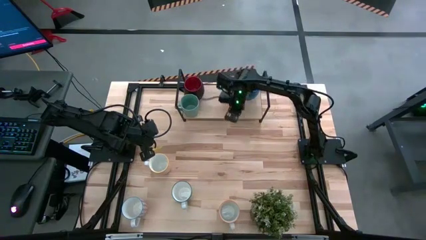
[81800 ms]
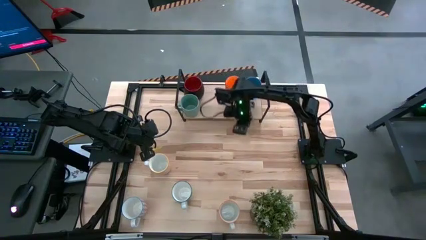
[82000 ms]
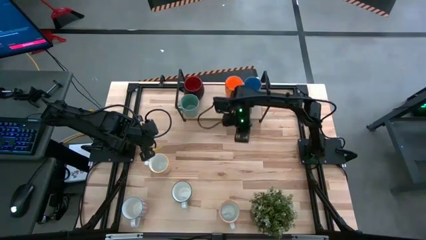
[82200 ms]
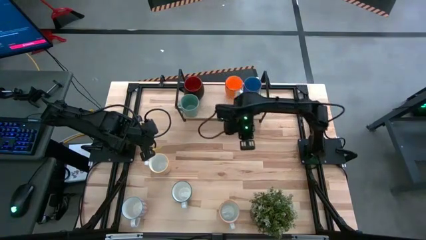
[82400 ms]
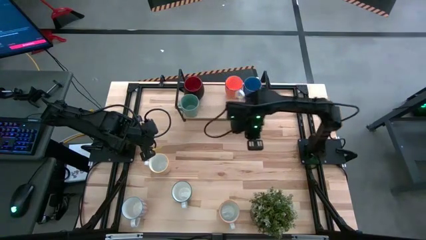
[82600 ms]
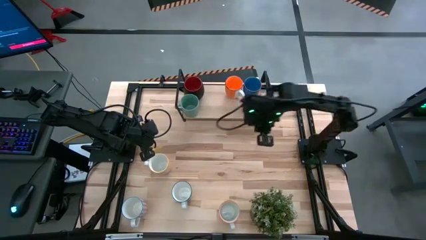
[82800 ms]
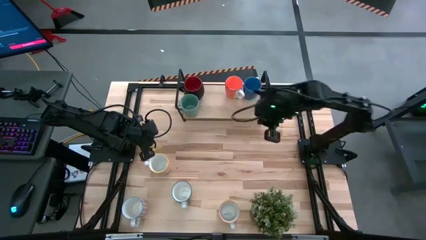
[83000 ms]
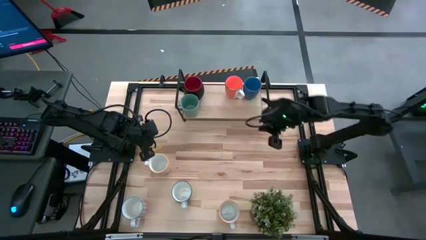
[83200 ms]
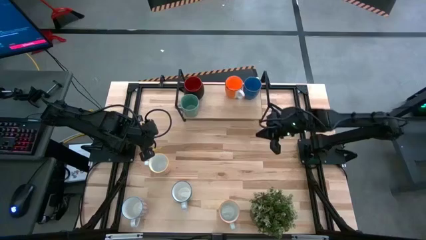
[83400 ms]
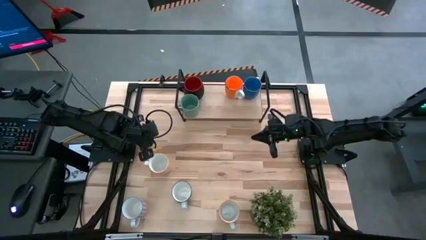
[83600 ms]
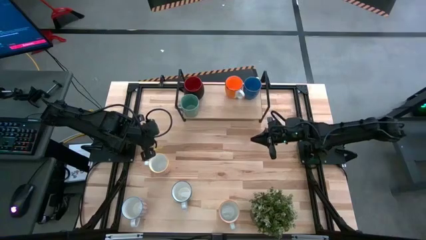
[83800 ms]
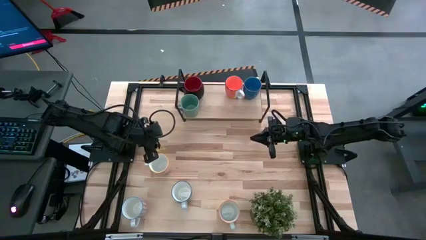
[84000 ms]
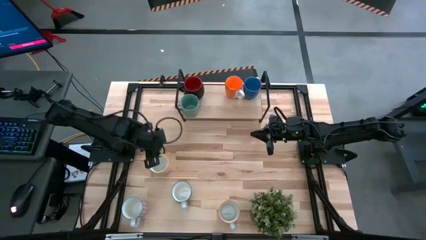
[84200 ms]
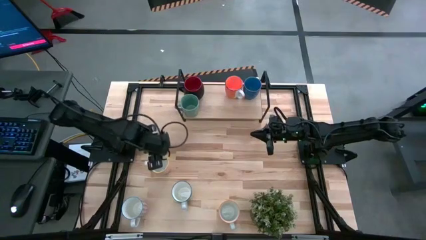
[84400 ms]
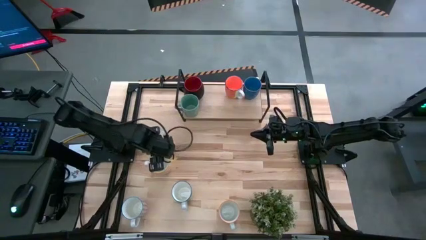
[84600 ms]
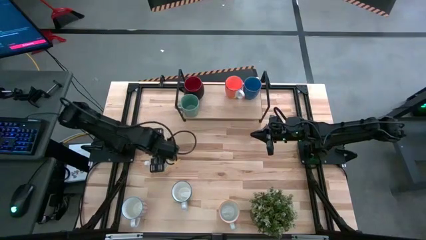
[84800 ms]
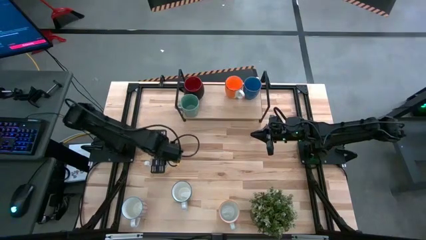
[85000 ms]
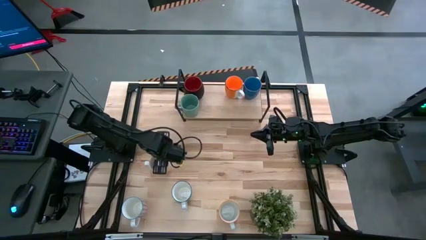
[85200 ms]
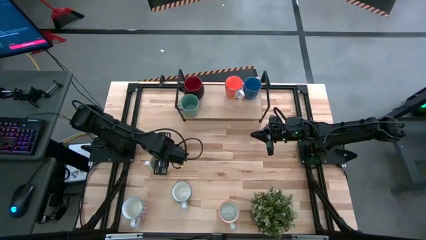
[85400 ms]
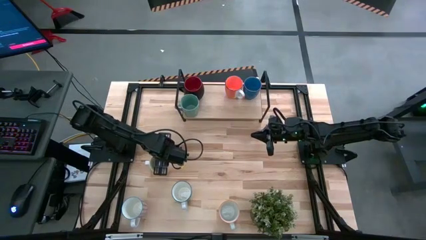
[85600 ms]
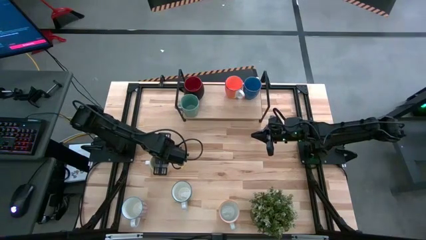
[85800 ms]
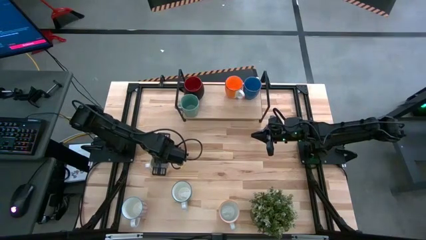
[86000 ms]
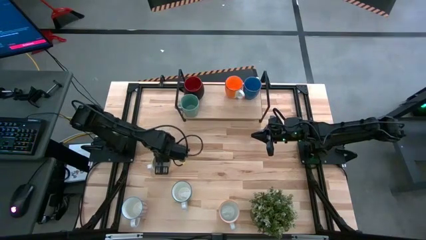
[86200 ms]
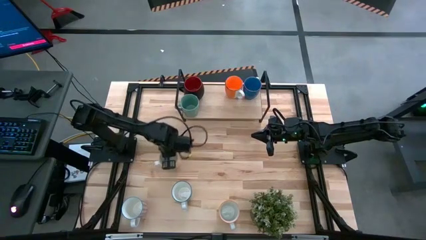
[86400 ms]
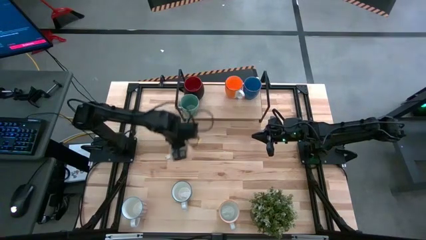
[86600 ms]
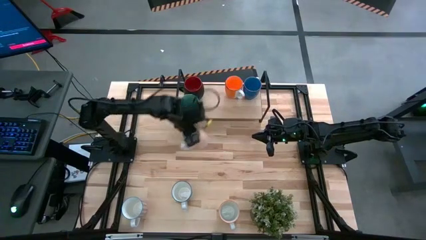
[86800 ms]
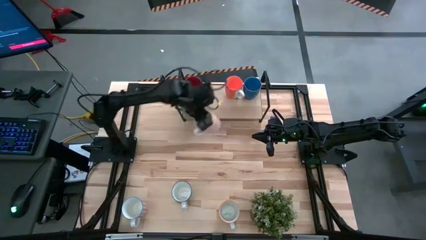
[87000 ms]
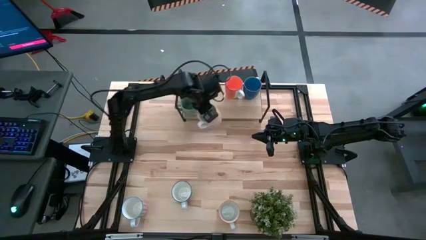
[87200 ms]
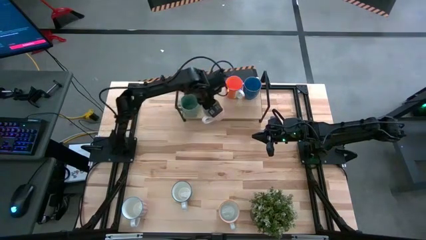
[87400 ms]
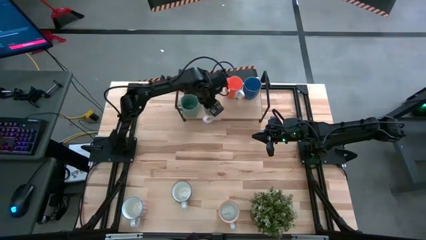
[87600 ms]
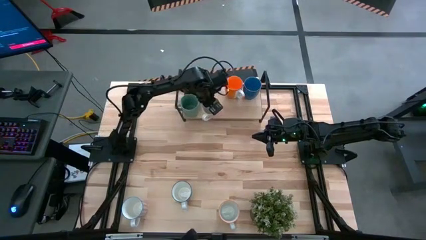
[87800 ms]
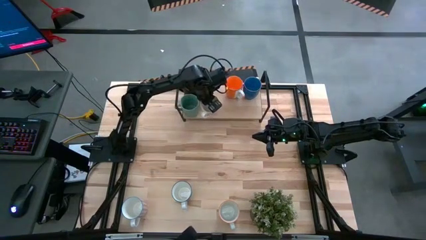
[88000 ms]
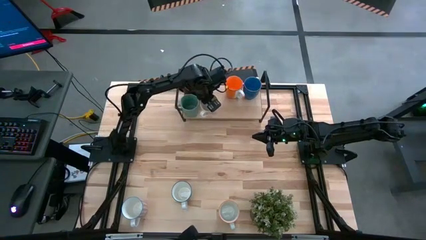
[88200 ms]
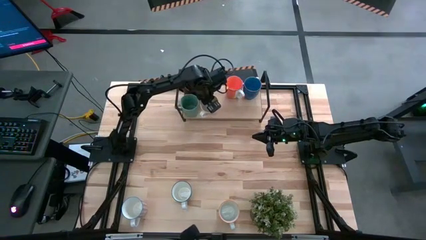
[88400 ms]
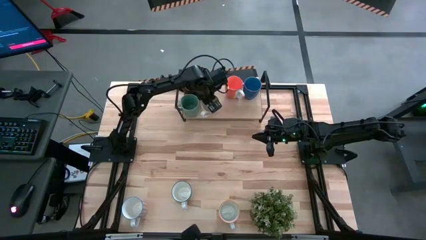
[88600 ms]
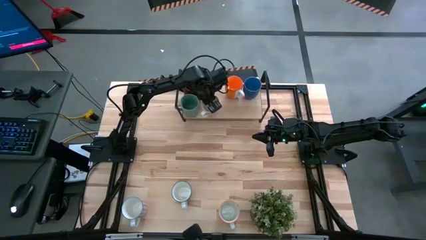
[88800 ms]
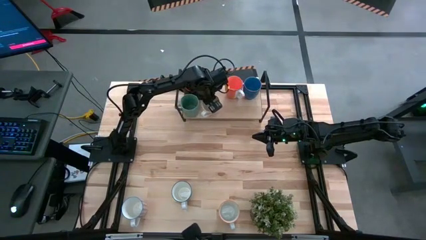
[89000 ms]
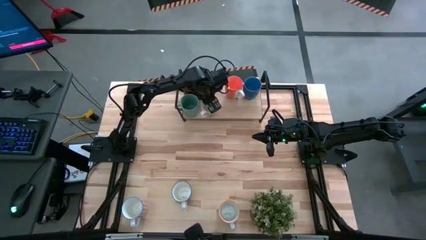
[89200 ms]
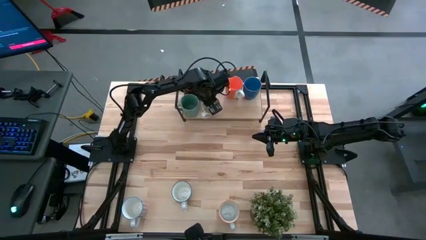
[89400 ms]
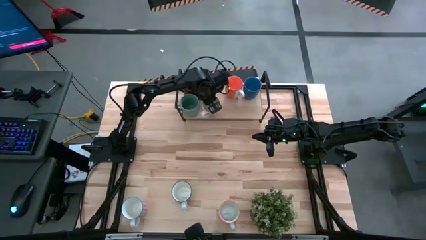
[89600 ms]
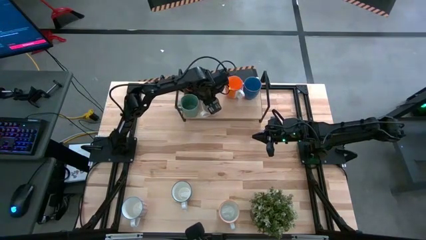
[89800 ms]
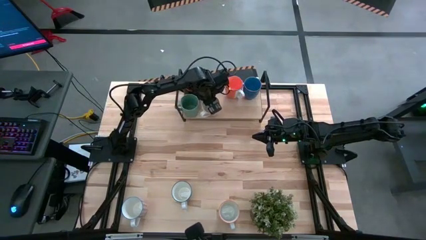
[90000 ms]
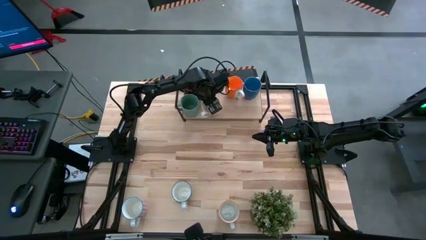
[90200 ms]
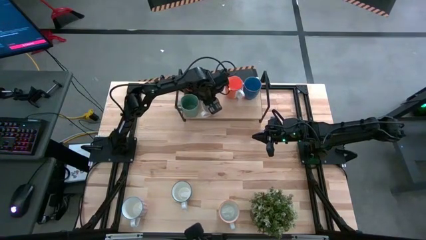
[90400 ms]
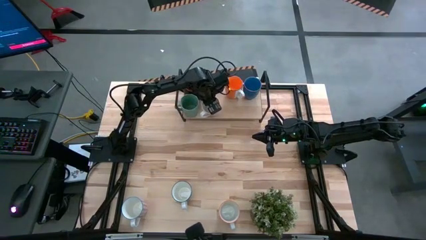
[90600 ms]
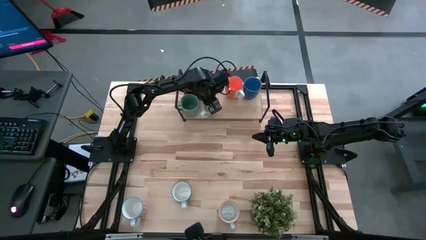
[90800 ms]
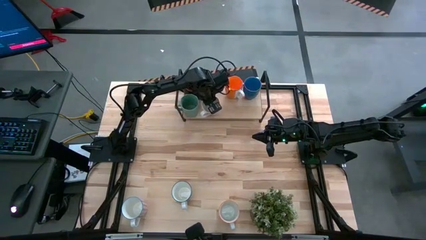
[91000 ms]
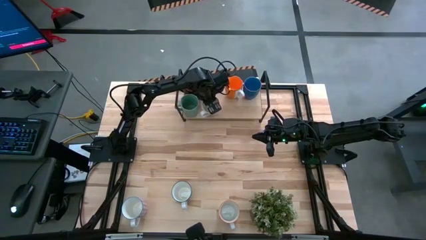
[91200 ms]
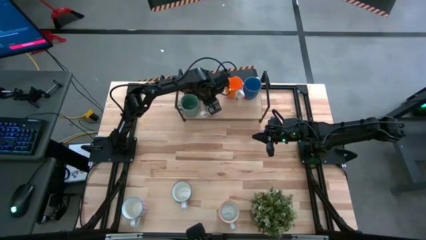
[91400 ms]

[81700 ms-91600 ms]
Task: Place coffee mugs
Put the orange pattern mug on the shelf

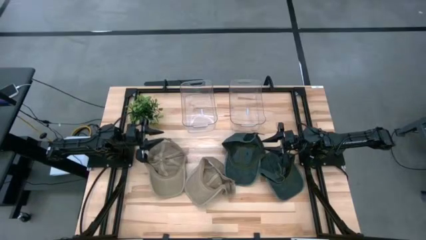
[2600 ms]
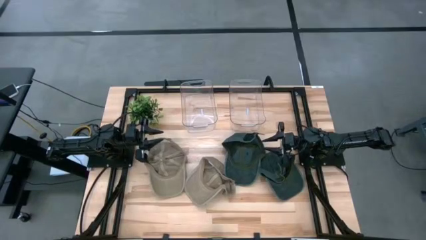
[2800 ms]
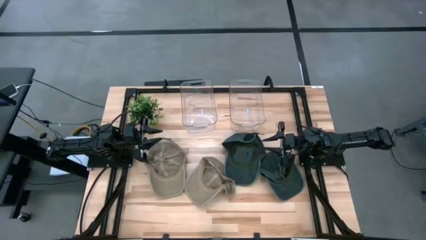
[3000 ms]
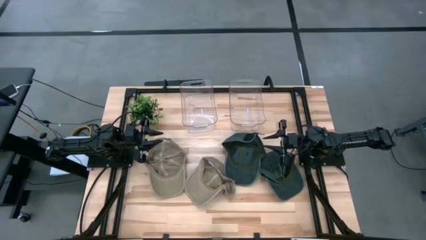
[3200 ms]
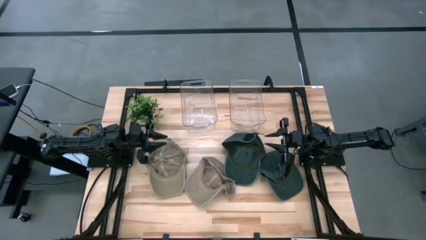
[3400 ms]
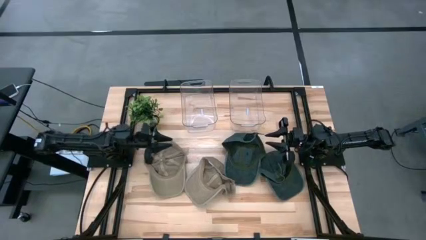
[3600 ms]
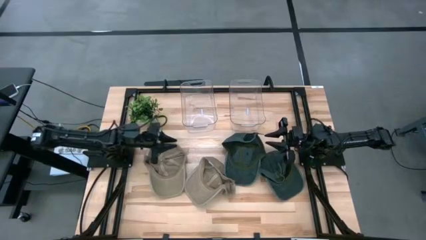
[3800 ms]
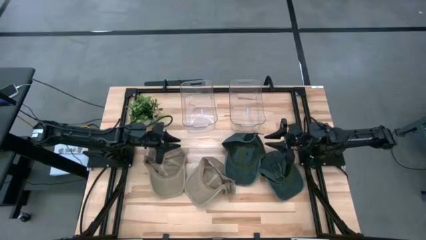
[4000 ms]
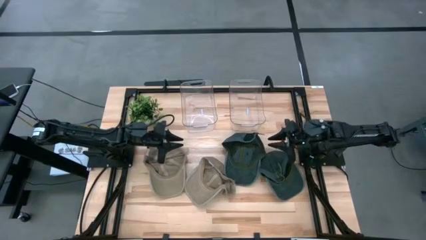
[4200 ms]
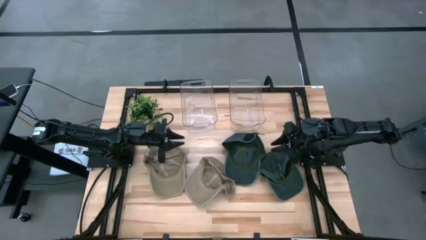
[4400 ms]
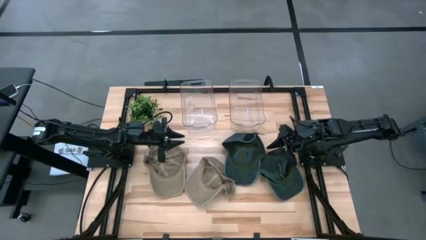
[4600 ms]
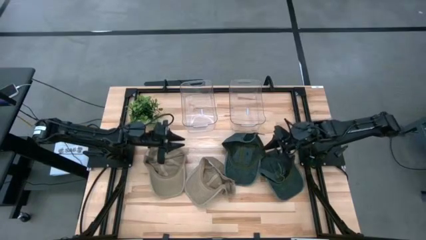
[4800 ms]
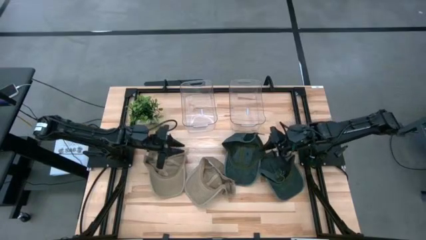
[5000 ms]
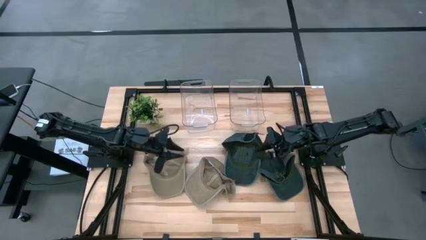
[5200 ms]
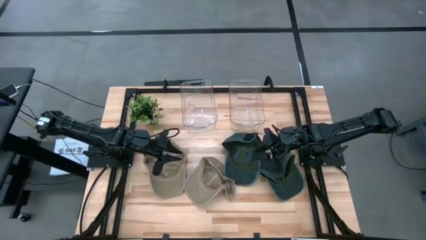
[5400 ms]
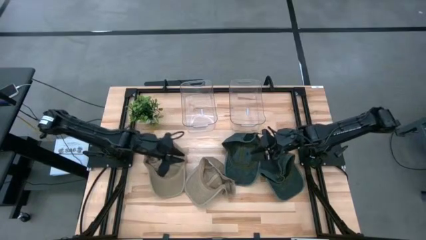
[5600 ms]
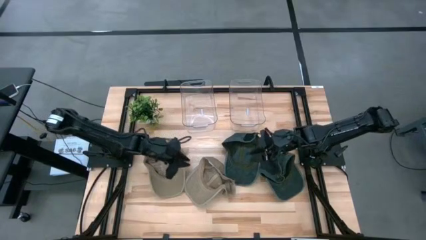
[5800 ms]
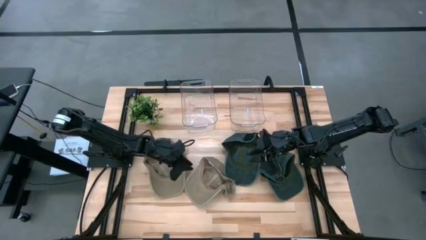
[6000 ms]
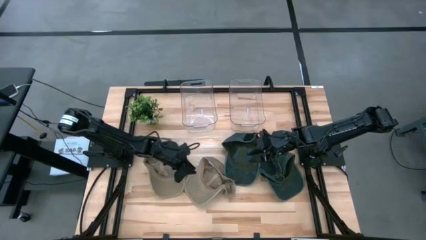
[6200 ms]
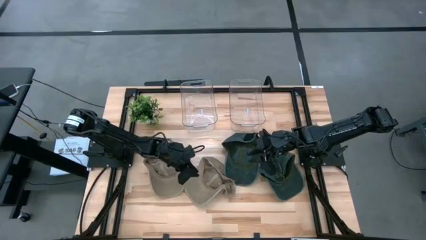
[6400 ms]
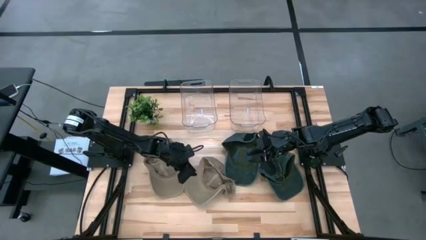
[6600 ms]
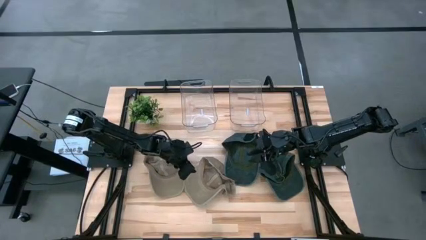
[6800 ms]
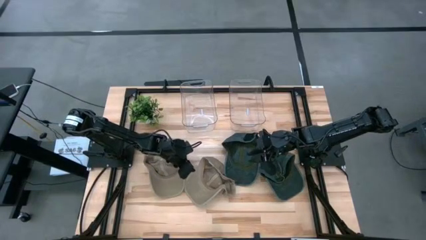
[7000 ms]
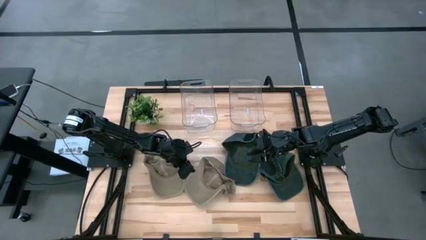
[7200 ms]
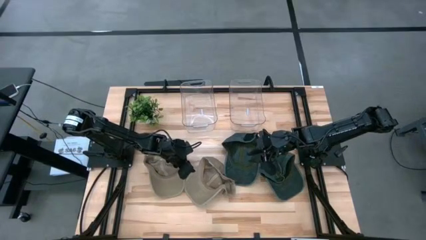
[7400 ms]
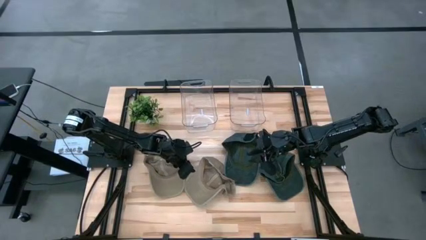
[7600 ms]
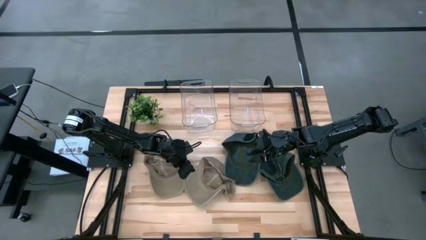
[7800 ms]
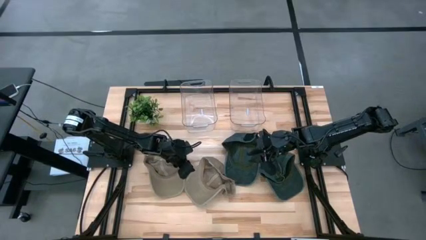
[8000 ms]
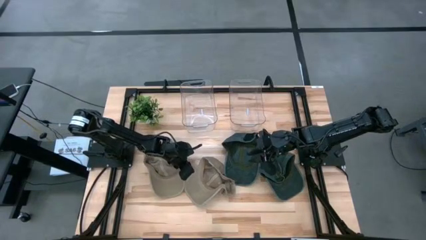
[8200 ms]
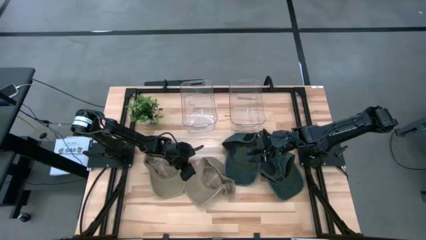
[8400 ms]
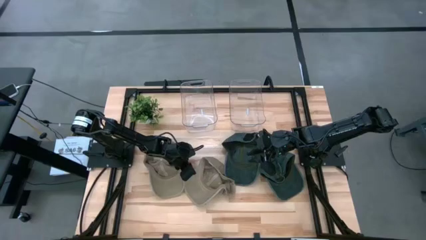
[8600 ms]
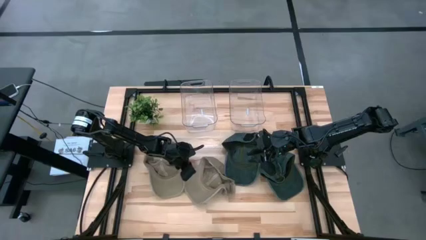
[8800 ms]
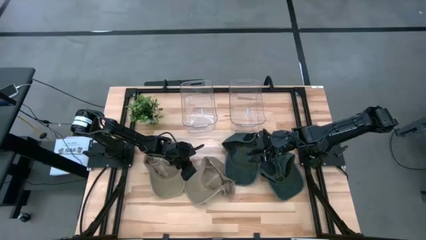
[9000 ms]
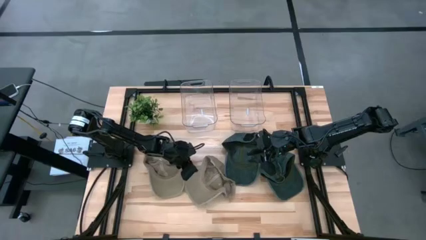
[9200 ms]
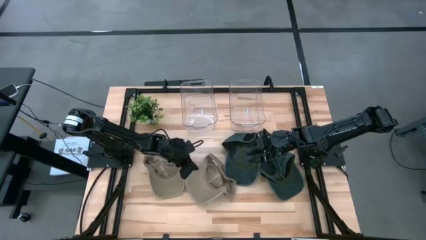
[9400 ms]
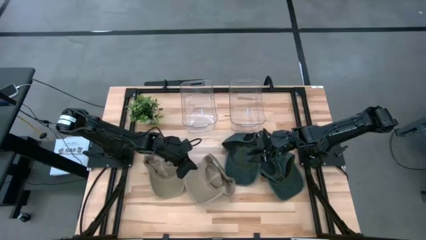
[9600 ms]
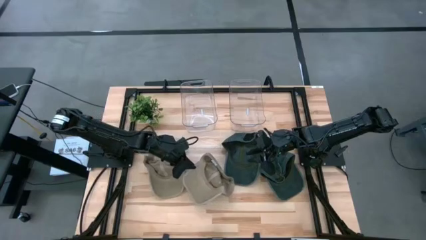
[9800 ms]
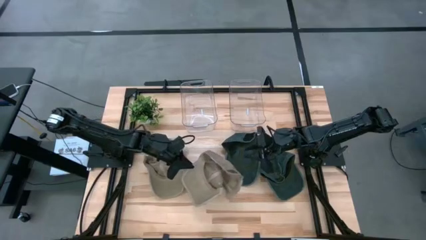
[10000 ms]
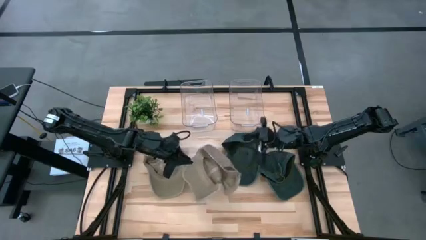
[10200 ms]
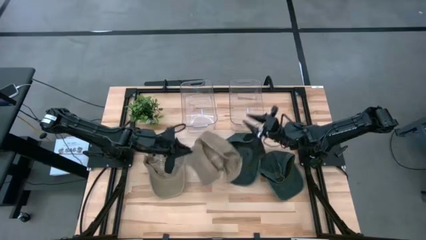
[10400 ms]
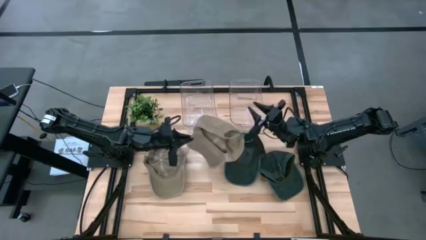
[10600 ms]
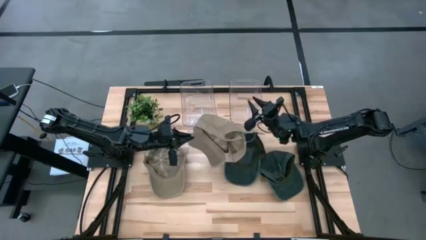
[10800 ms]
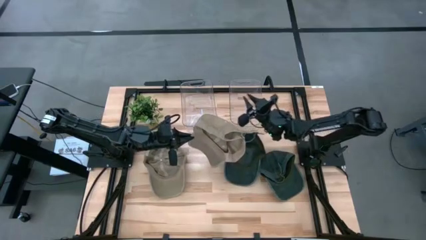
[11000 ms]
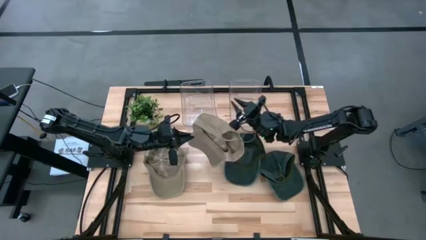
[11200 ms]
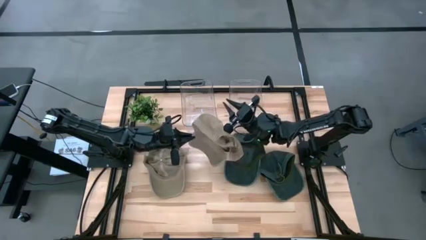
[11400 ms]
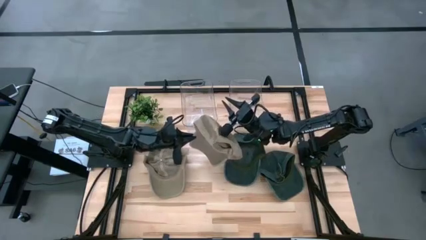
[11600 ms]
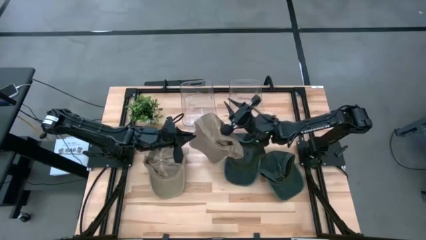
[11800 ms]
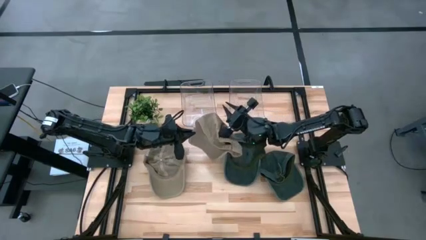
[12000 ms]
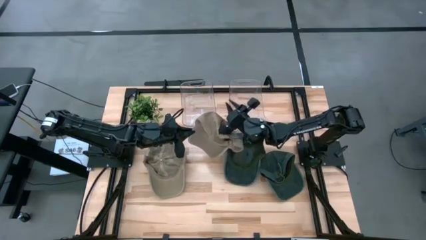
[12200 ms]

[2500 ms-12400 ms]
Task: Pick & Place hat
Put the right brown cap into the right transparent bin
